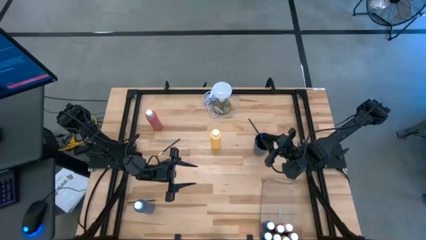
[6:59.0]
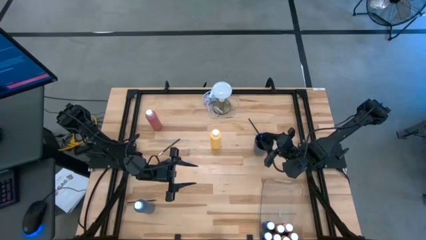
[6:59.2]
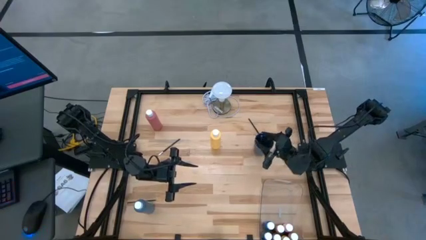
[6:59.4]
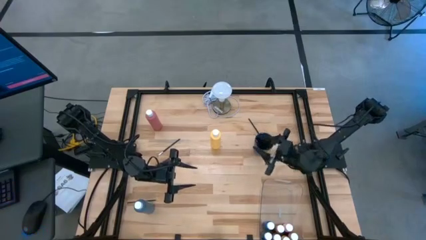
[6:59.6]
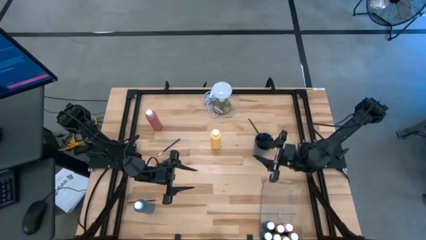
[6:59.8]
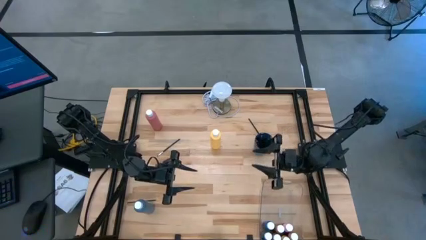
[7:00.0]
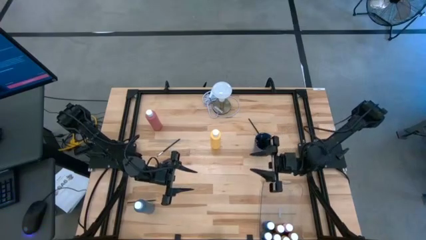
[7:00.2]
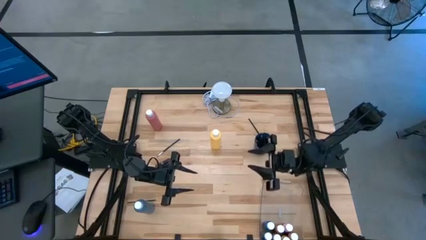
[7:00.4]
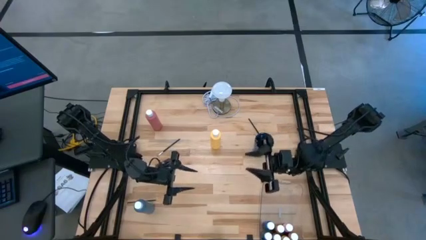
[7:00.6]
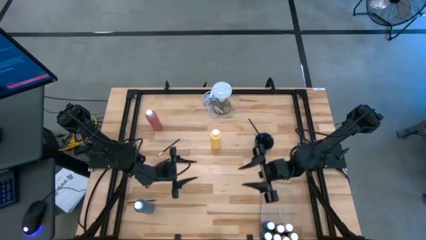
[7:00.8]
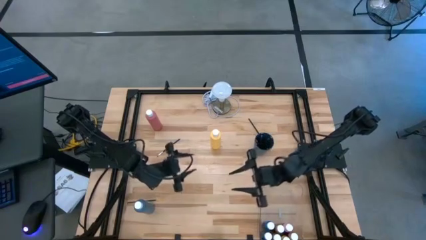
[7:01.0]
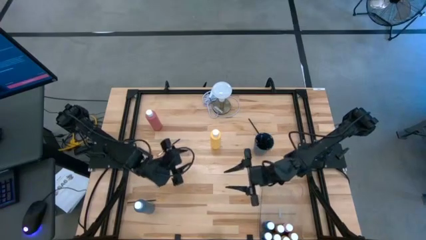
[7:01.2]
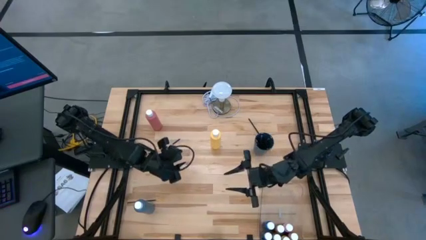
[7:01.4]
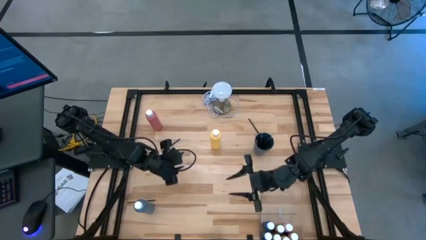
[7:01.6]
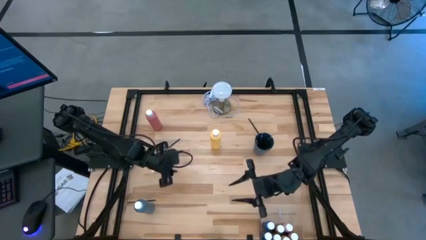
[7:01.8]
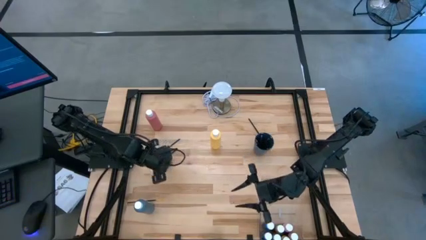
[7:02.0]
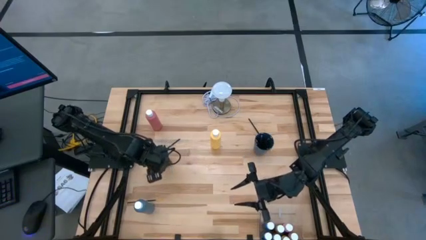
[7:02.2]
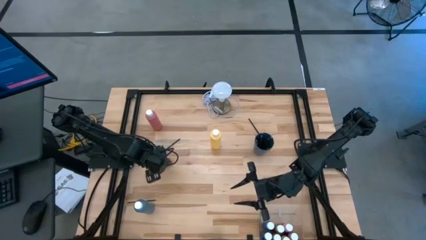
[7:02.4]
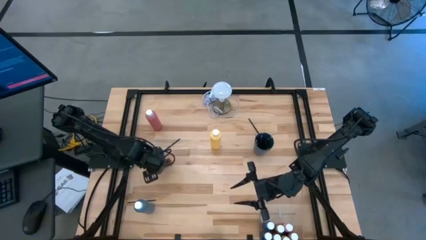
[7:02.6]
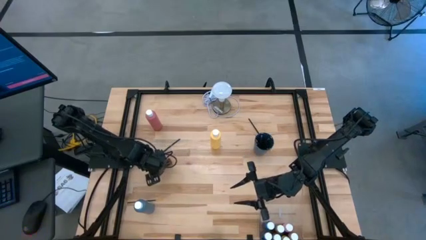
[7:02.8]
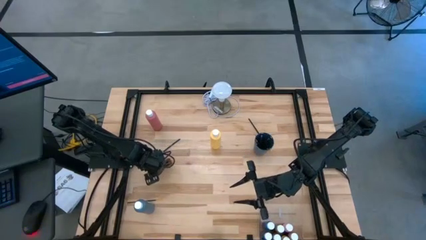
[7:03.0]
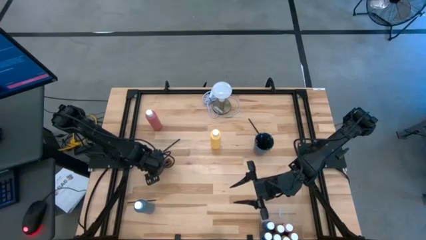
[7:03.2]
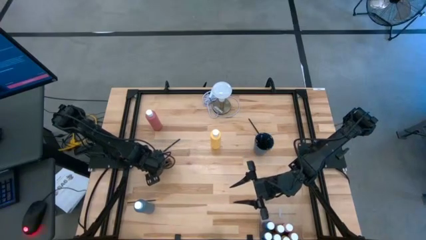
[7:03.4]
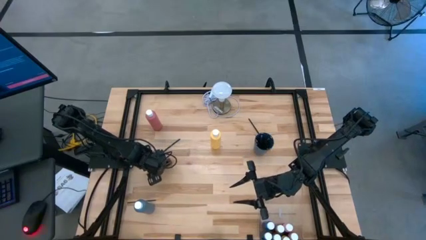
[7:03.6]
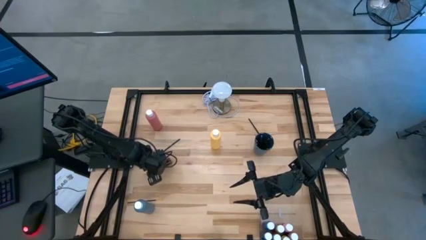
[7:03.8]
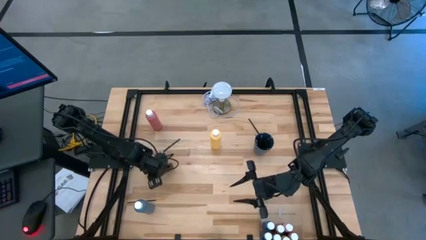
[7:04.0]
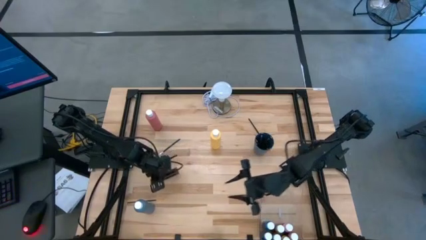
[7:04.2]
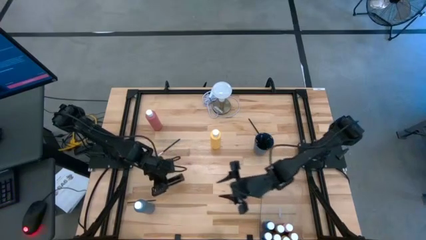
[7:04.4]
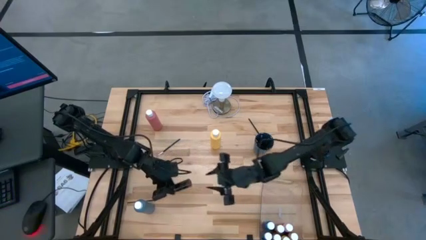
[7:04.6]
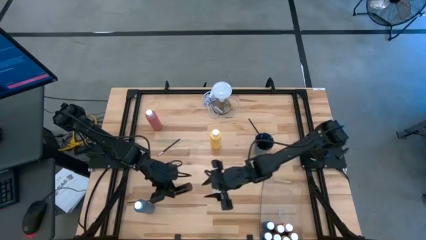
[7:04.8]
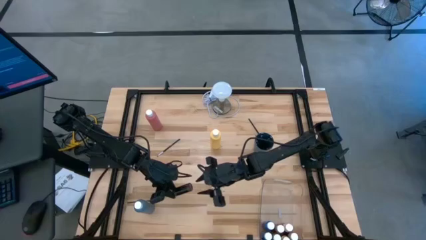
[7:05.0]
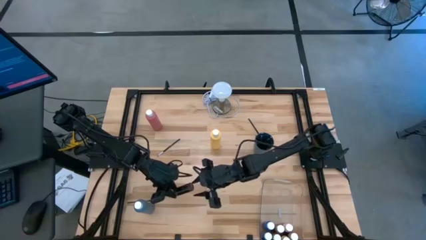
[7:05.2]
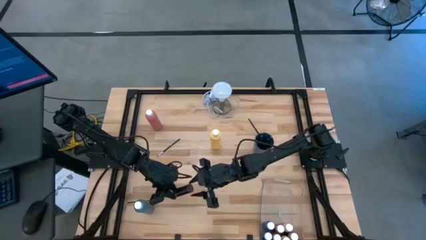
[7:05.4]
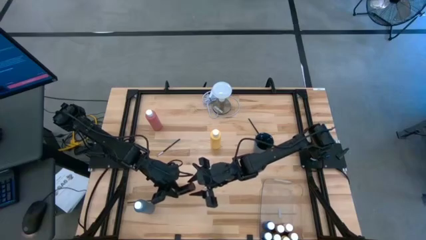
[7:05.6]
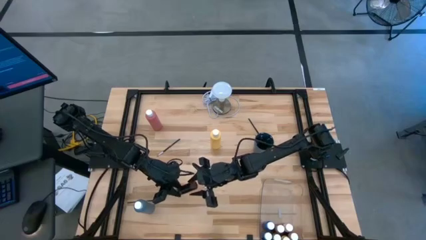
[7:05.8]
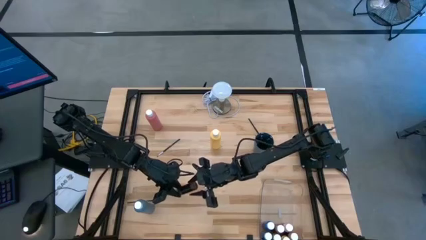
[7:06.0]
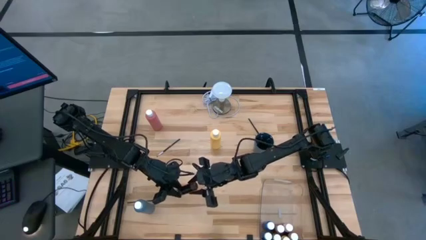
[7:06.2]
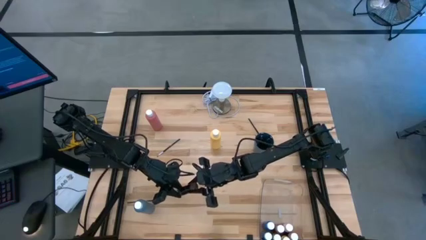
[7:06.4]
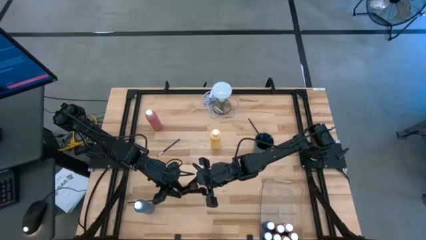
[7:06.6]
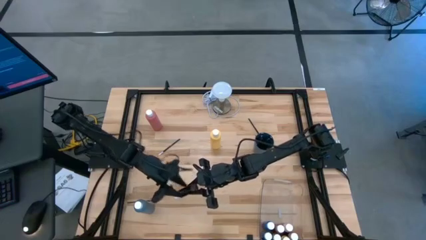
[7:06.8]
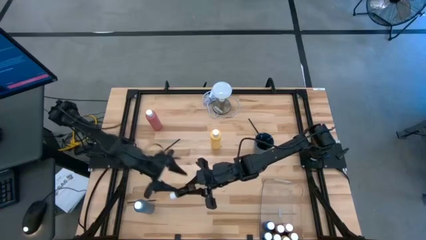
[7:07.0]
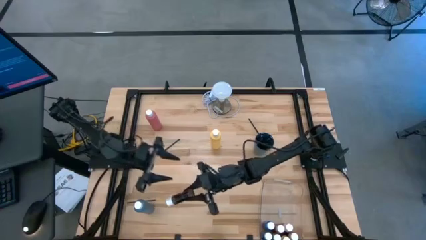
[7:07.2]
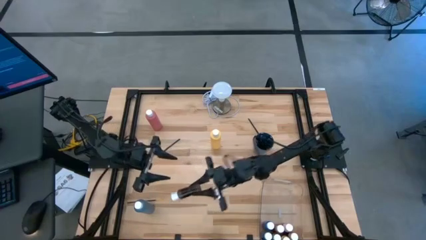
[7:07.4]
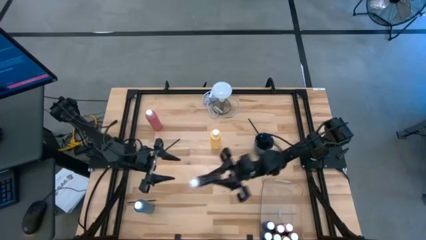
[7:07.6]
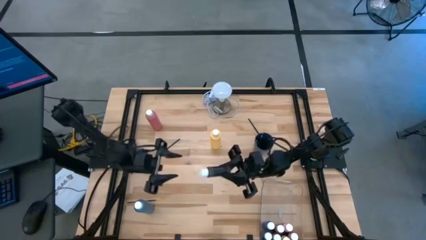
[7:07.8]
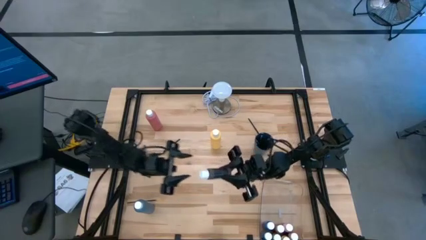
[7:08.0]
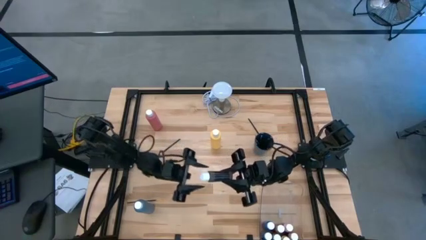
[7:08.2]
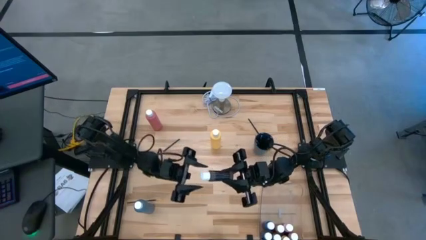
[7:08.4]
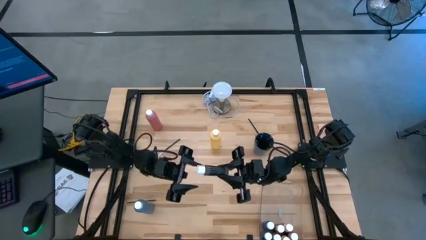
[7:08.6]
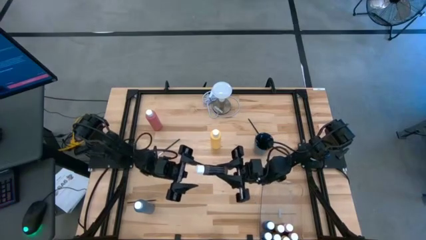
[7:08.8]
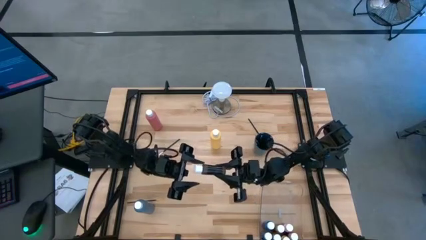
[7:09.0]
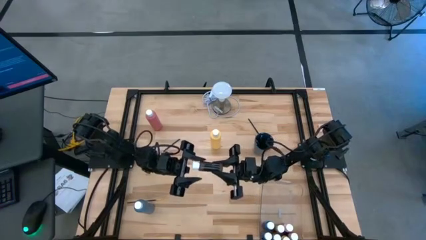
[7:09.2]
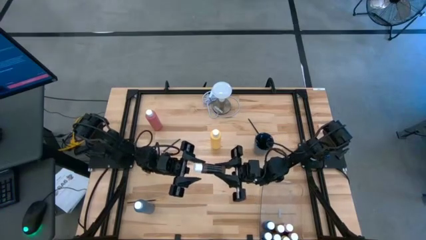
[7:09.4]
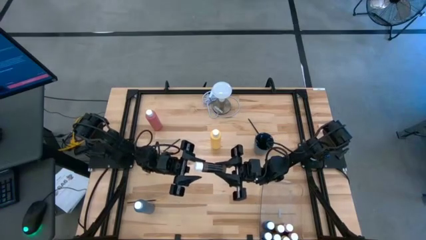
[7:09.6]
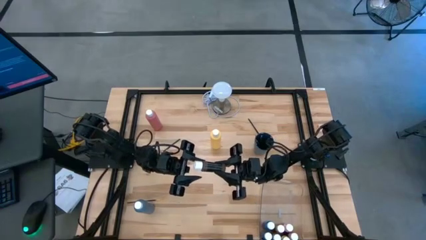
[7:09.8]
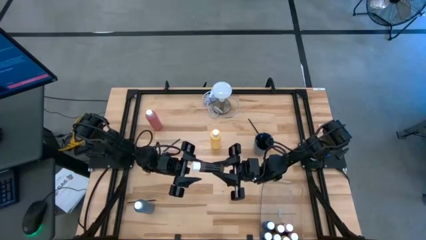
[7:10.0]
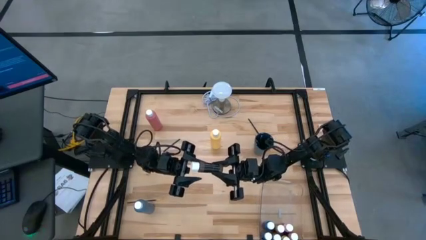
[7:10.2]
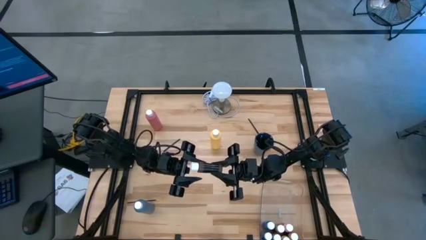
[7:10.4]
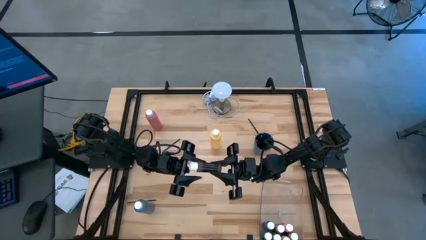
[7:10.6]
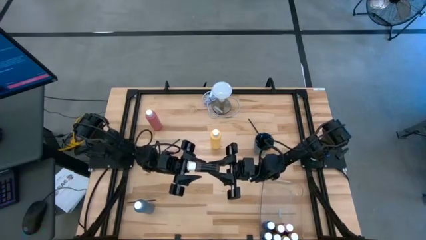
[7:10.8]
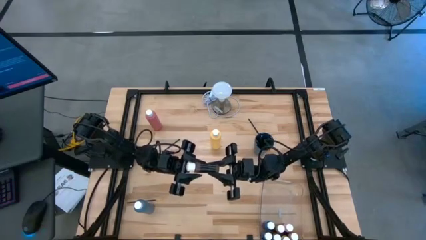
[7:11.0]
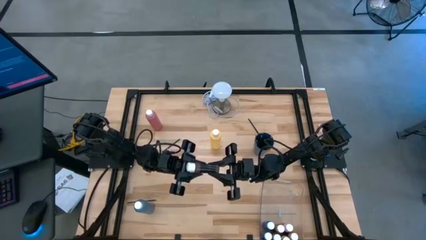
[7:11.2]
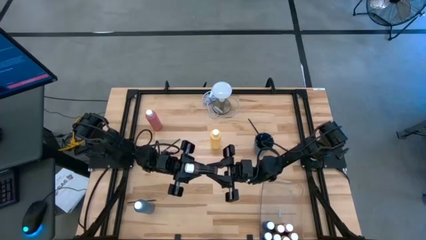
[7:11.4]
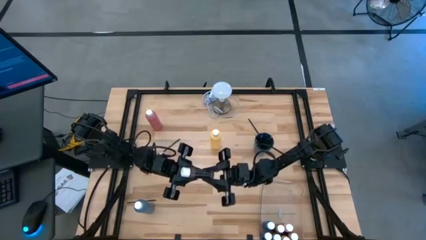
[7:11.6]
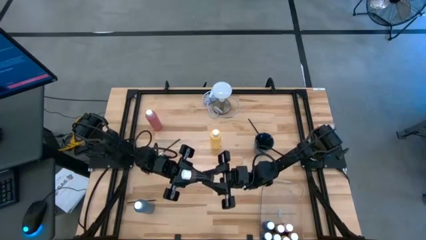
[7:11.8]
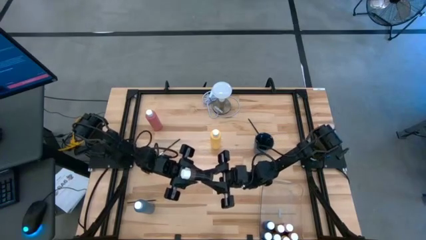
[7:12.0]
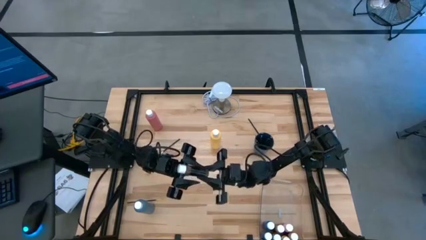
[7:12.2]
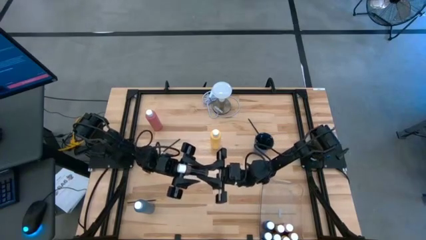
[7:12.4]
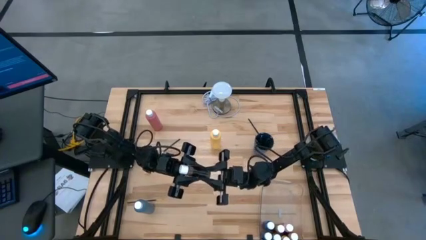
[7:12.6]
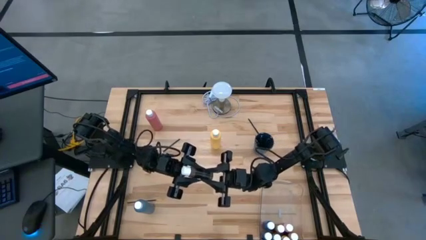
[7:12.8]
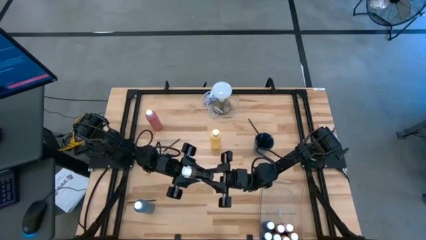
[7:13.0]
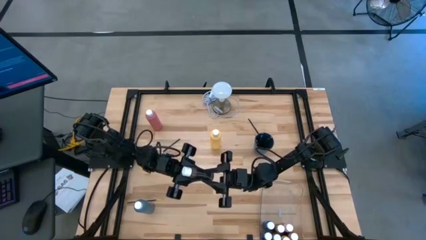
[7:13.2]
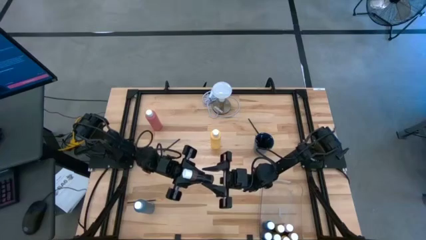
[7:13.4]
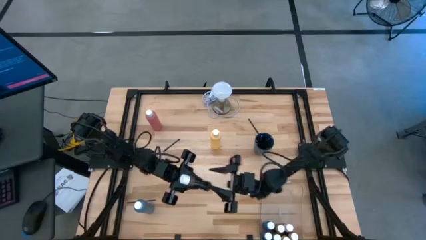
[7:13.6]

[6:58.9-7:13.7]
Task: Pick & Place Paint Supplies
Put the small brown paint bottle into the transparent bin
